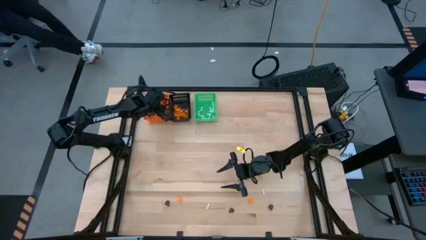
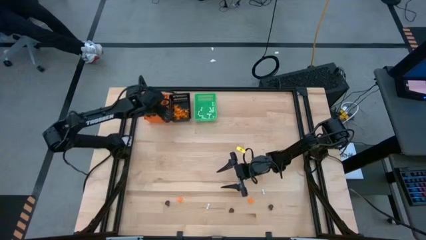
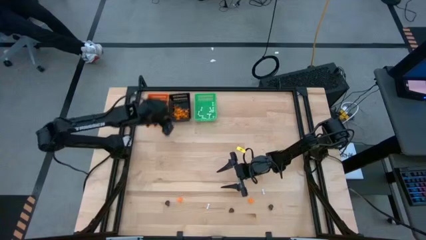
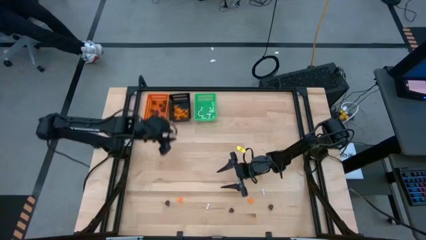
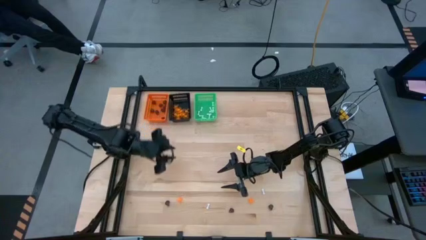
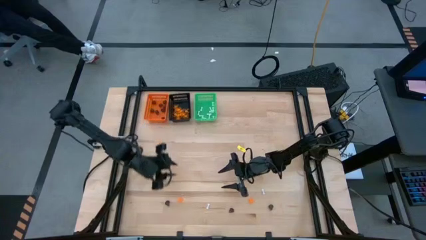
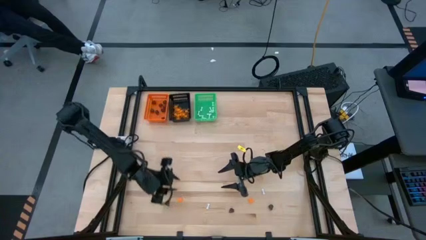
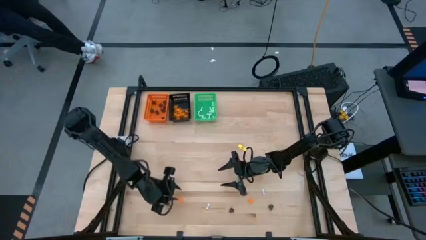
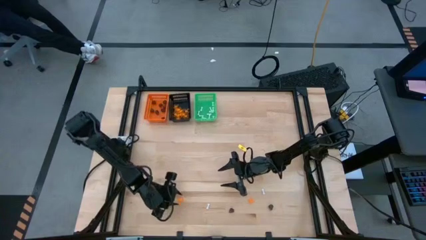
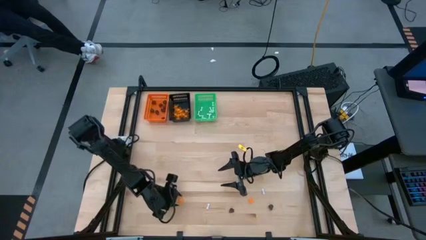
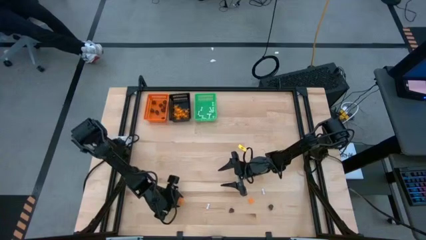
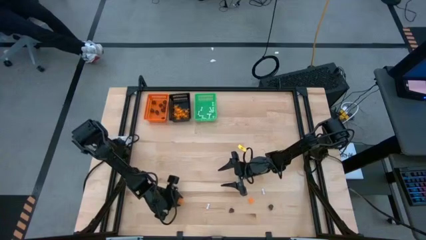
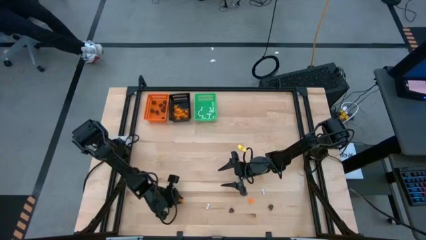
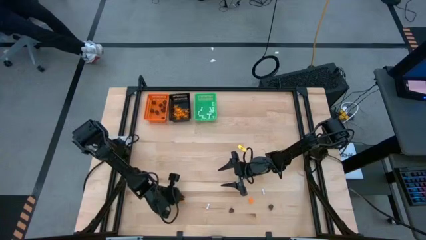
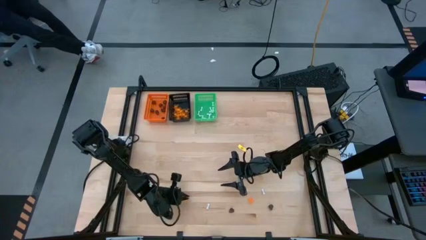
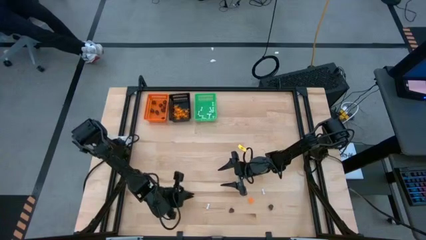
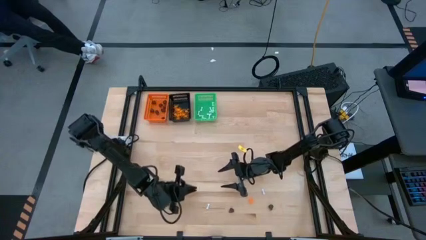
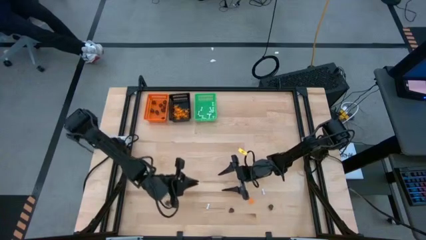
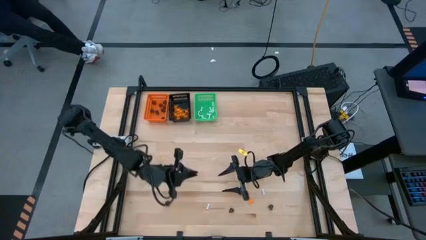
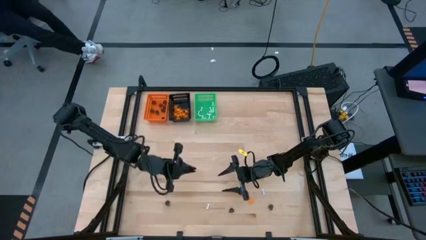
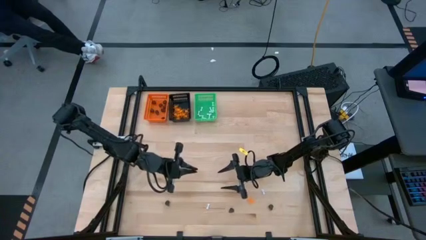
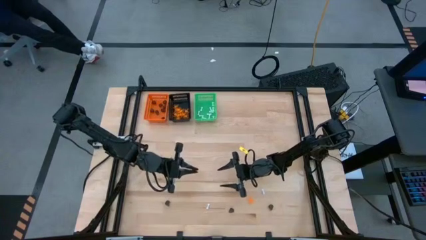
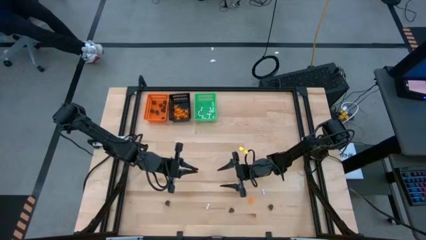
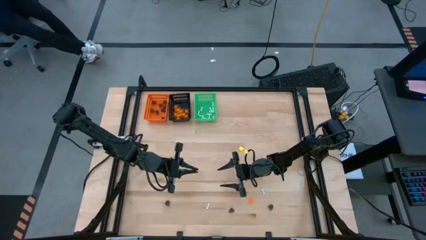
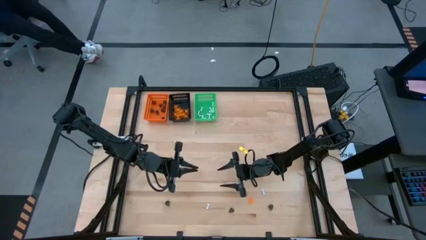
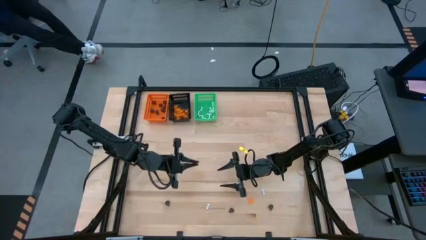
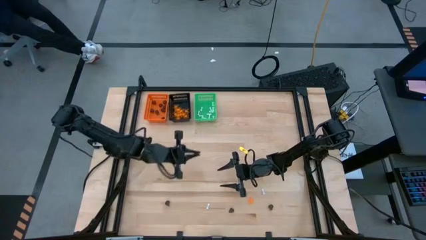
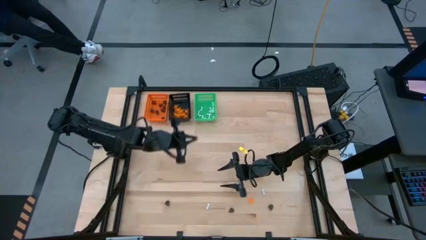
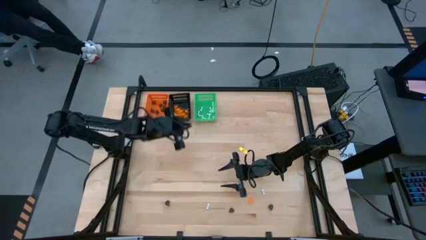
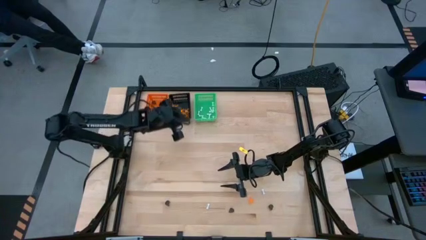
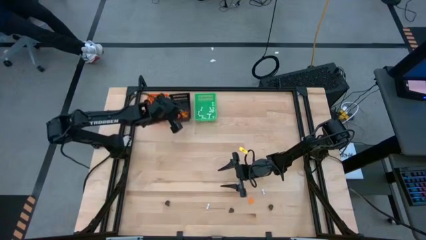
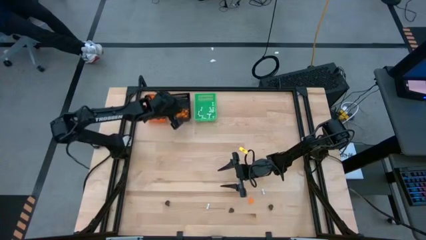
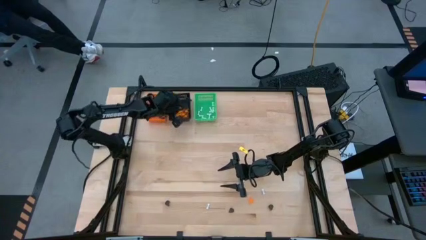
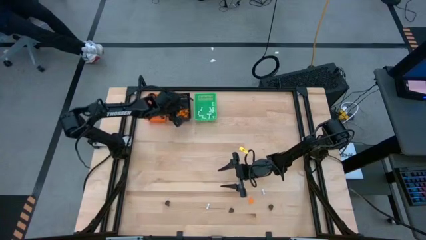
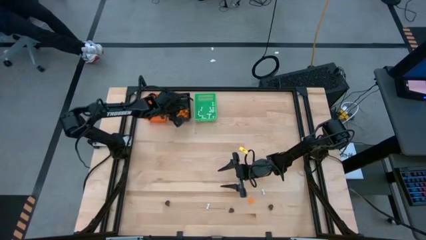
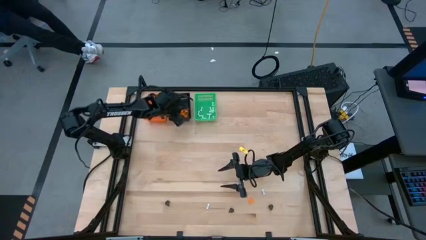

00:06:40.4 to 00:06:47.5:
Task: Sort Halloween decoration
Put the orange spider toy into the black bin

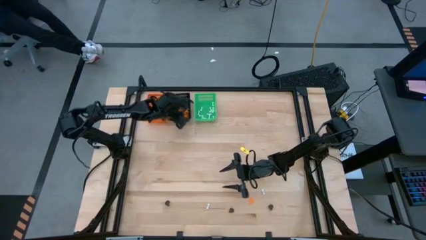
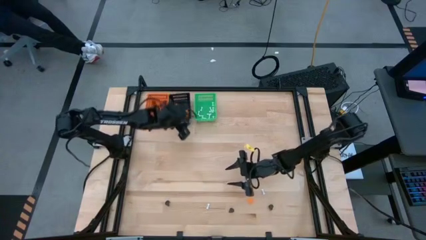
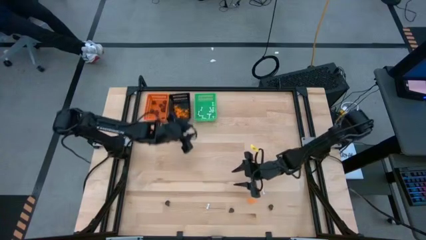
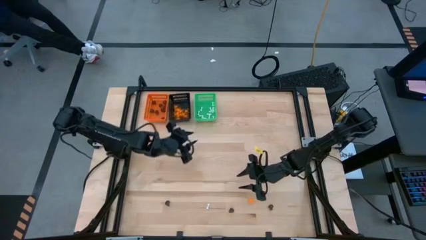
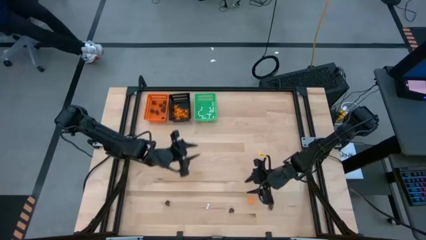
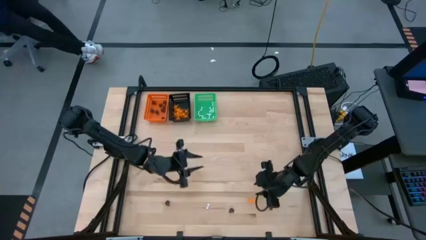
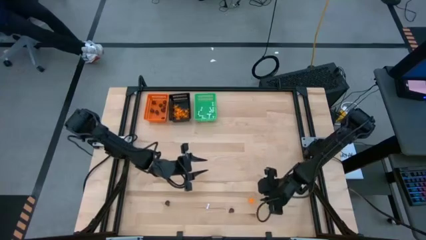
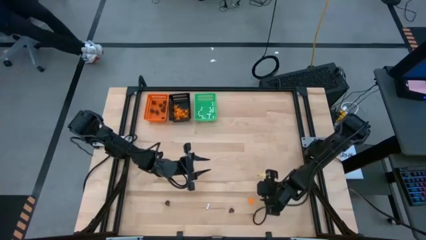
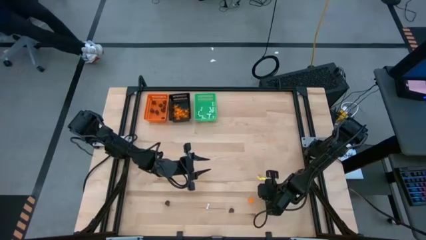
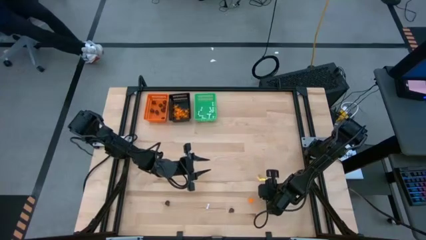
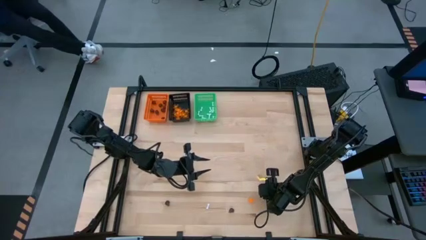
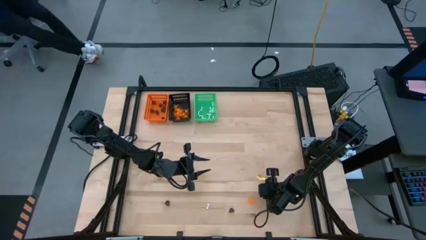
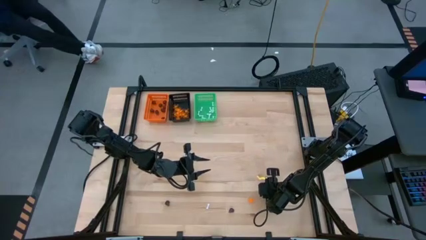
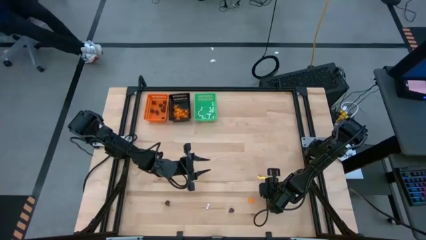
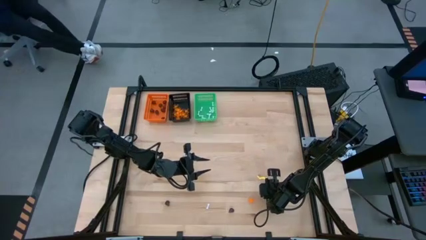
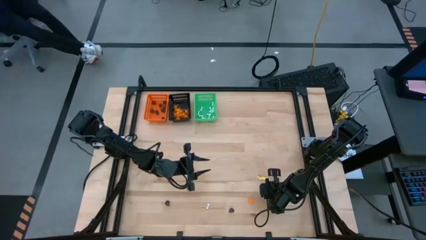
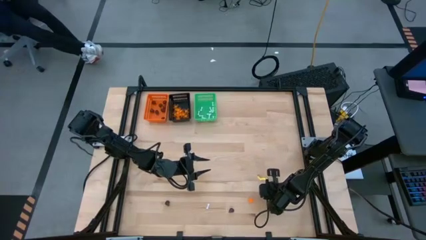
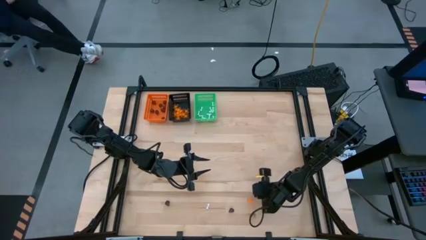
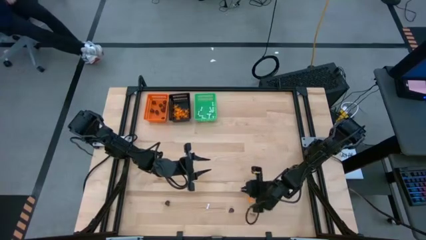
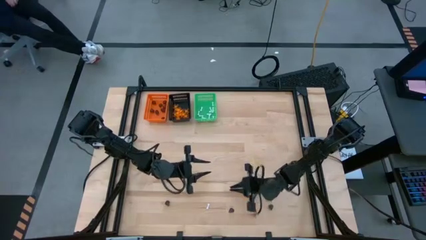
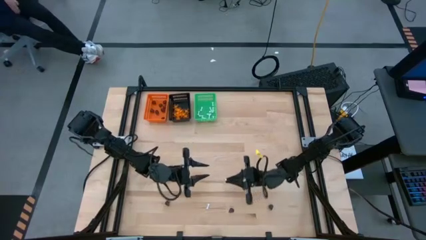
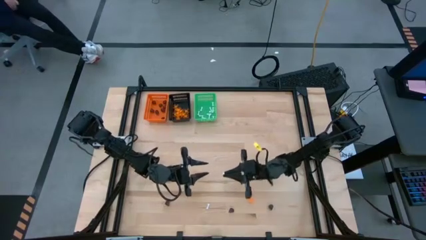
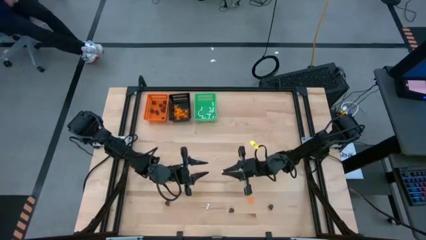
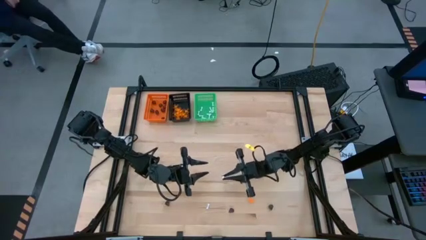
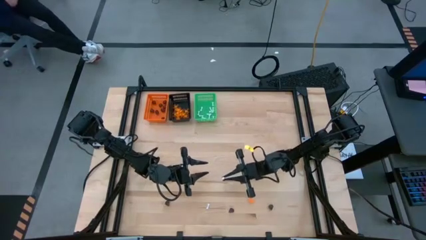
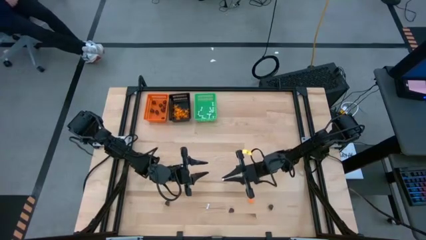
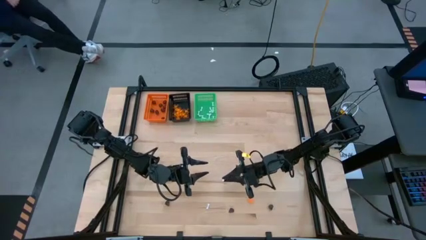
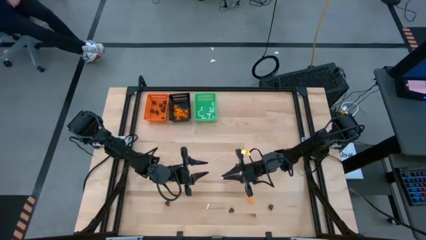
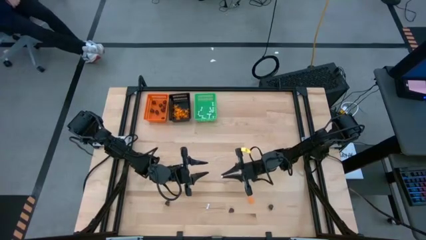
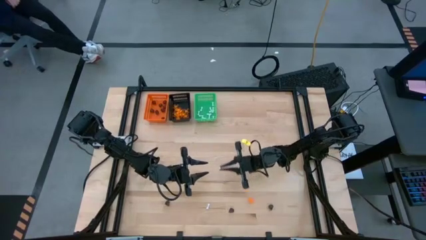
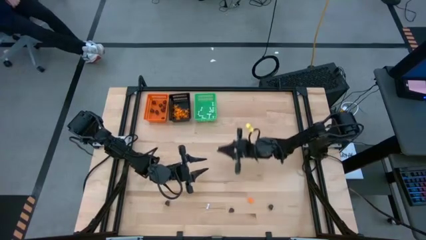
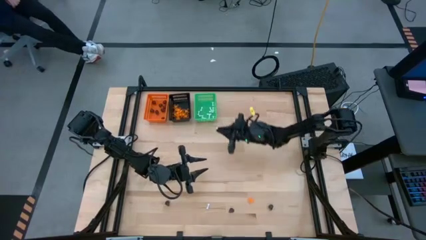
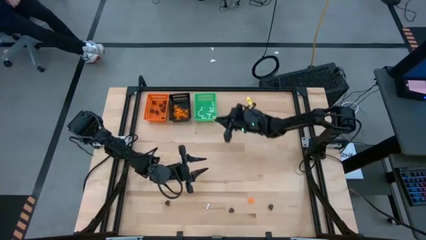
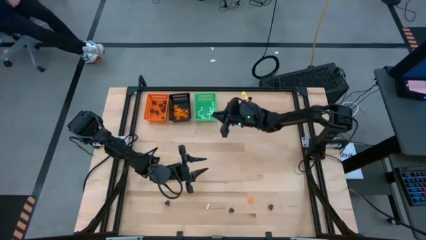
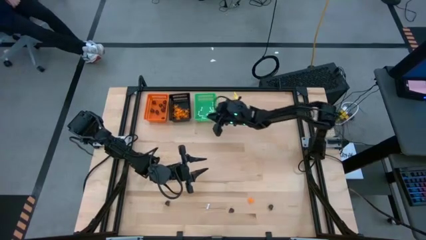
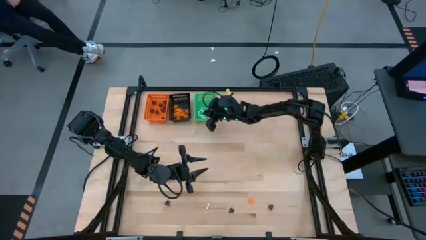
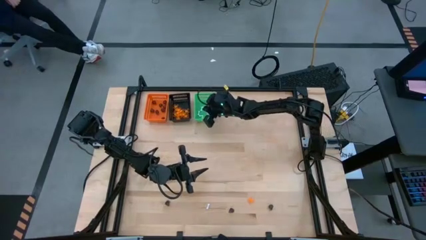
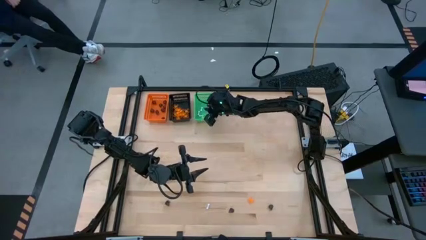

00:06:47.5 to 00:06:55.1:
Put the white bone toy into the green bin
